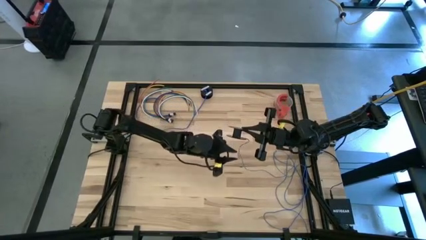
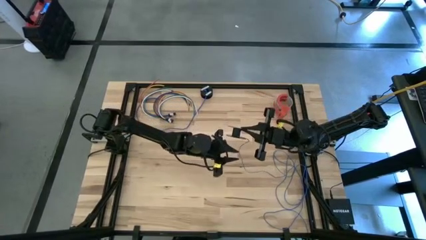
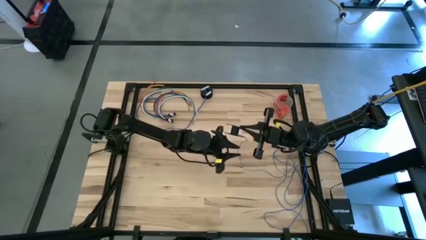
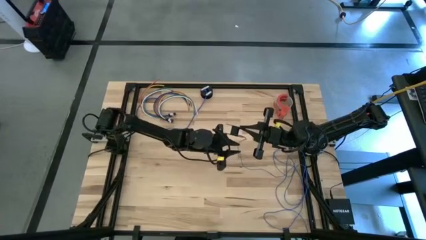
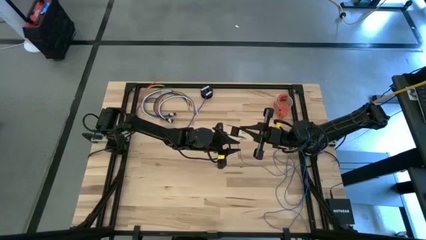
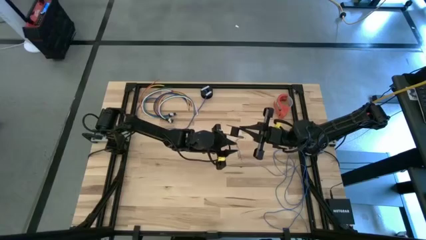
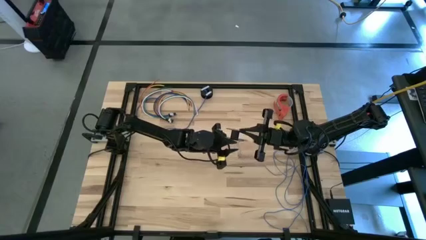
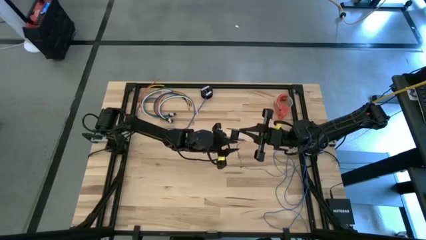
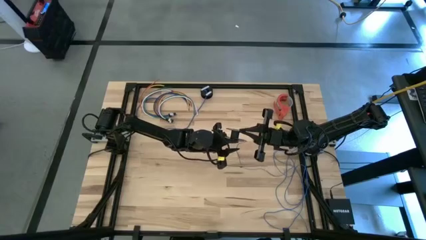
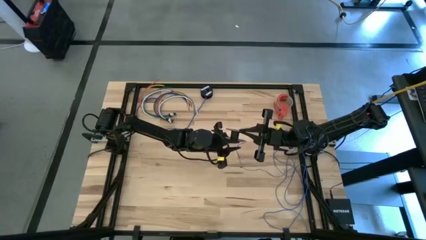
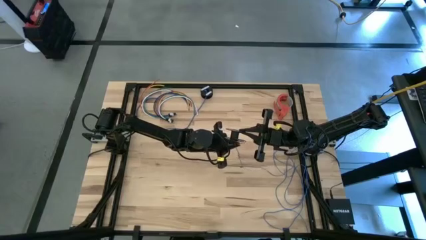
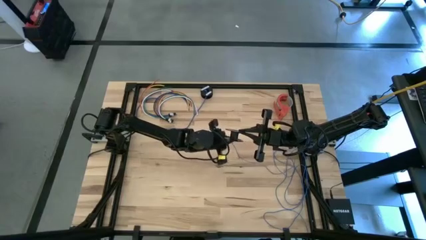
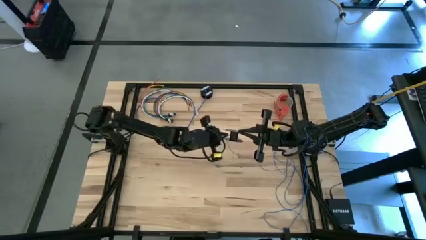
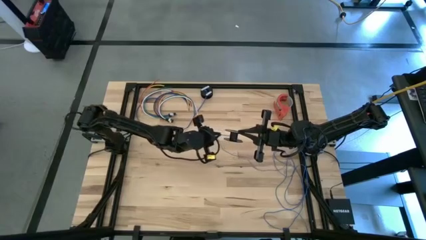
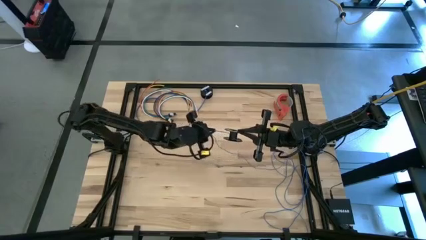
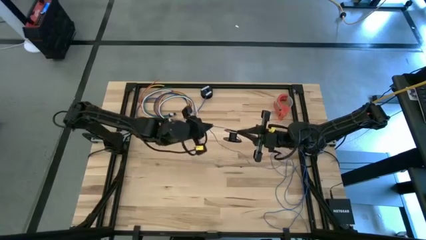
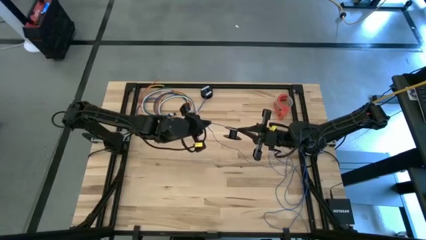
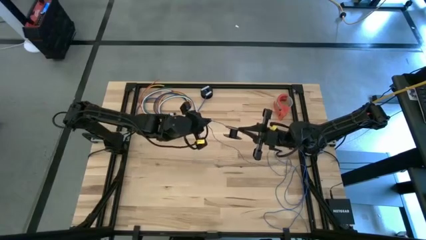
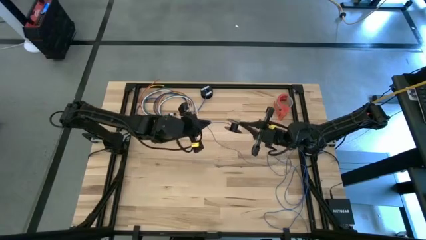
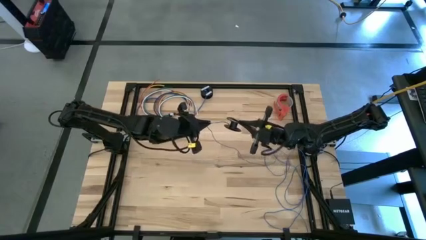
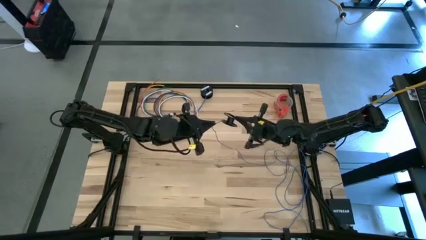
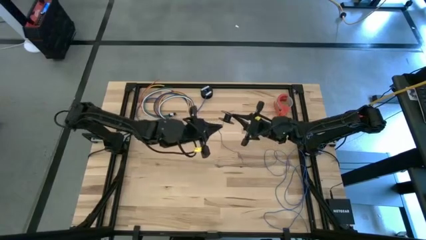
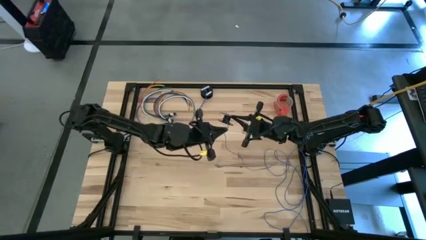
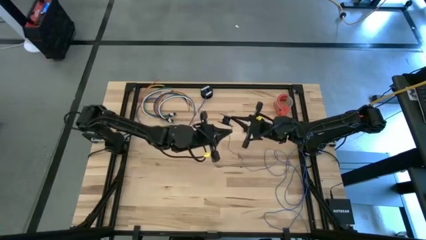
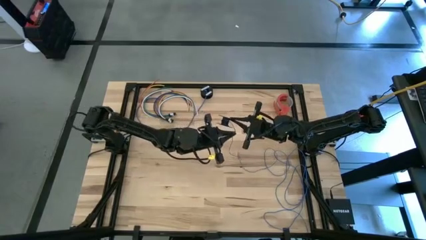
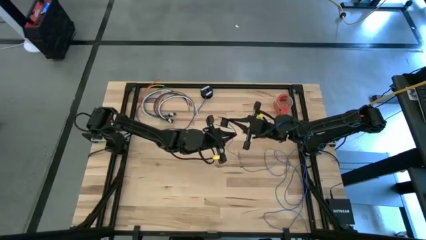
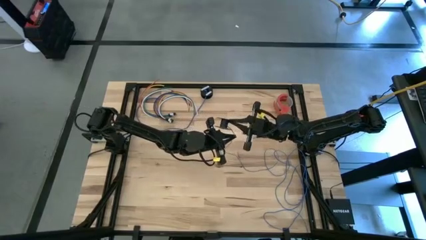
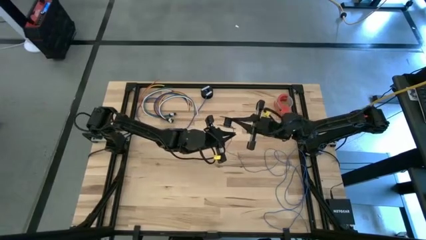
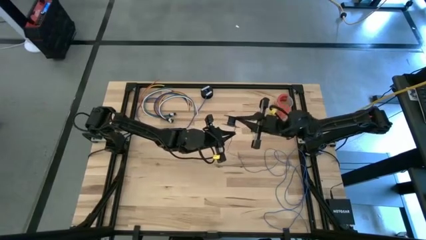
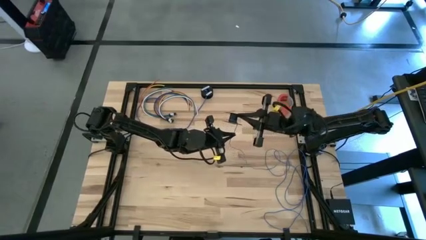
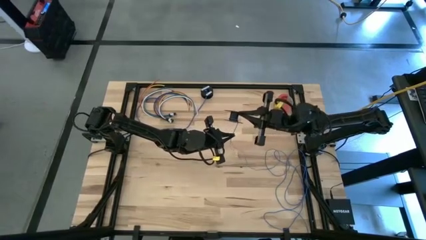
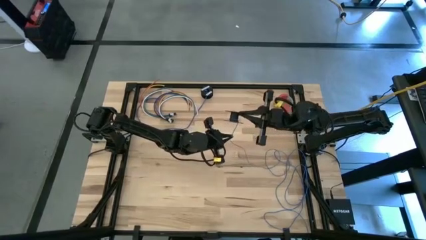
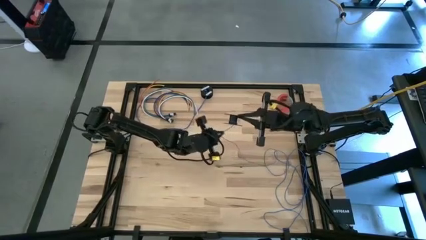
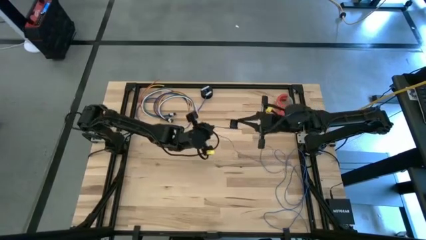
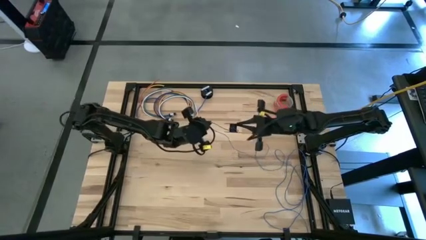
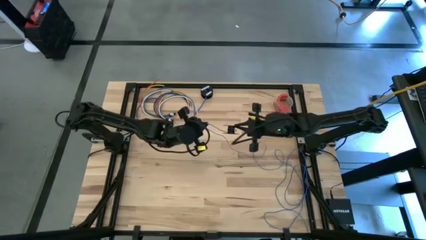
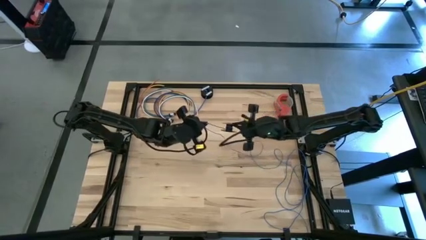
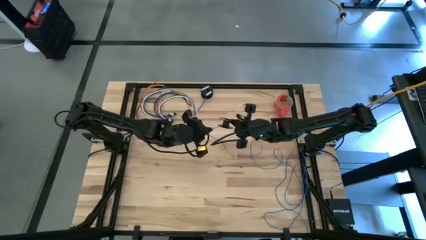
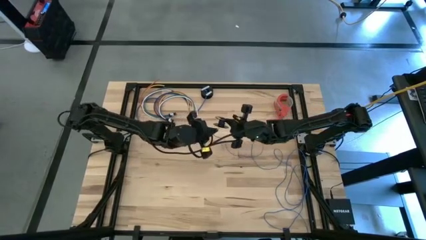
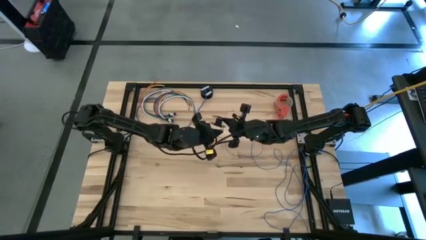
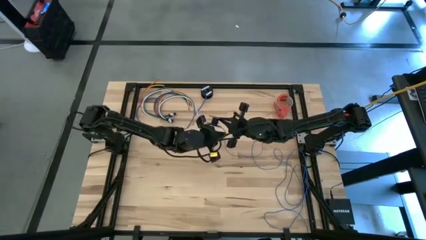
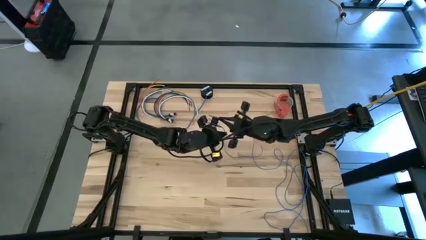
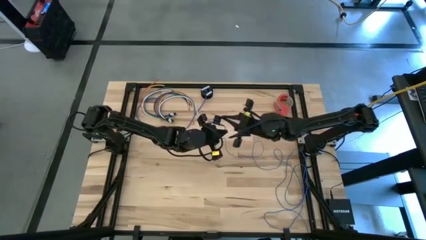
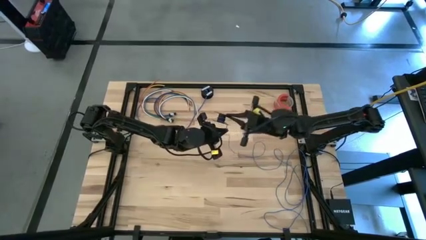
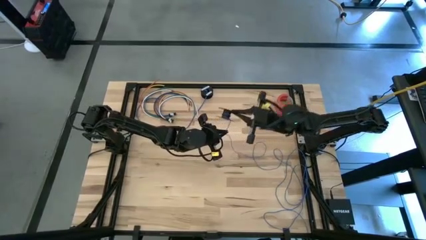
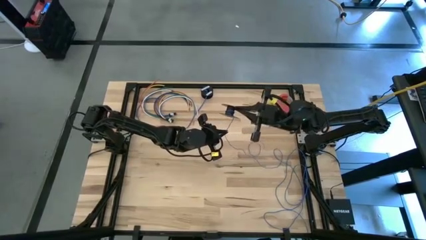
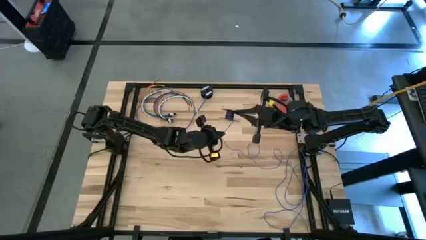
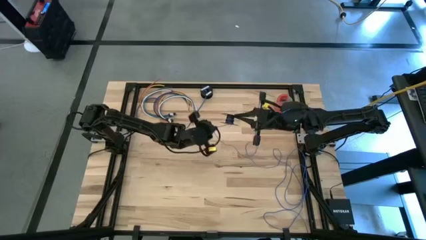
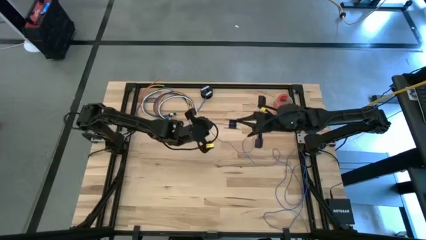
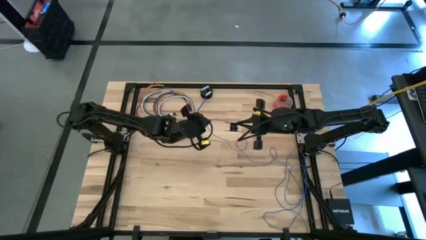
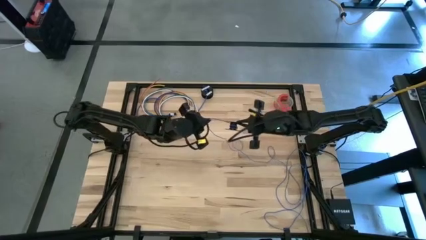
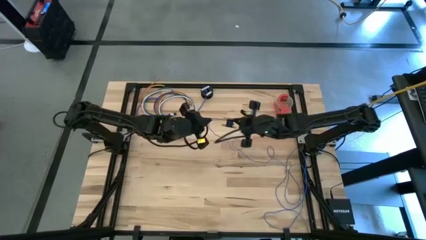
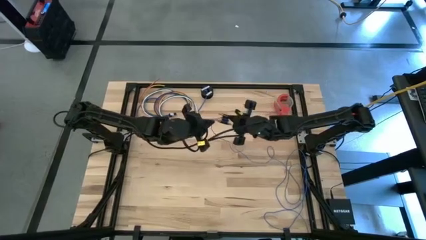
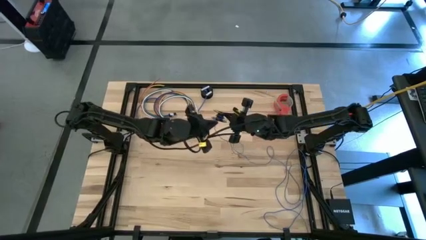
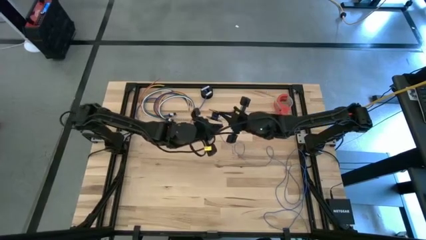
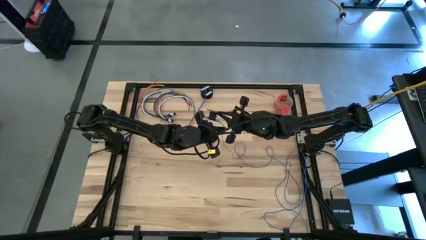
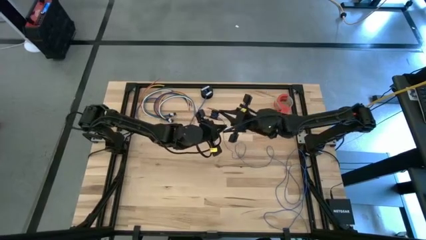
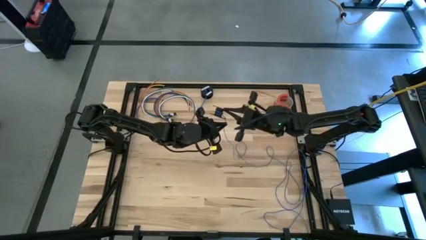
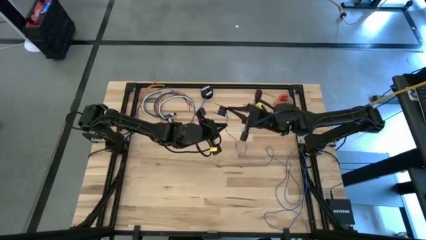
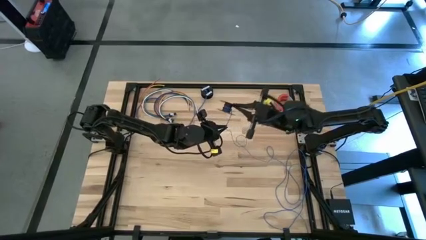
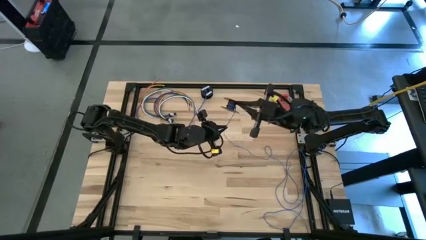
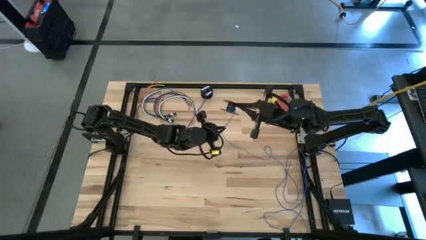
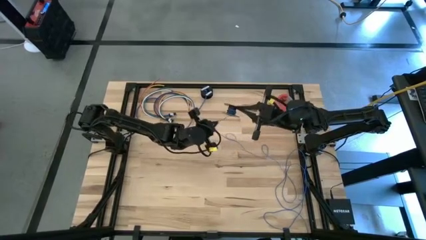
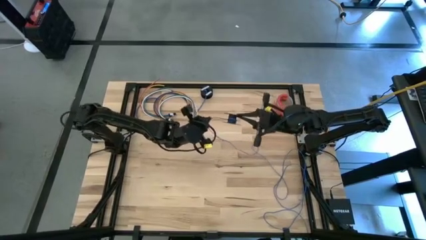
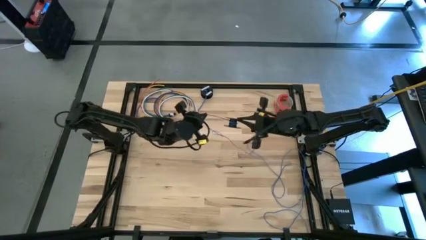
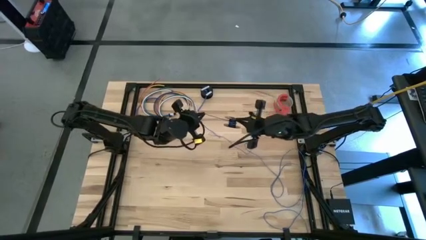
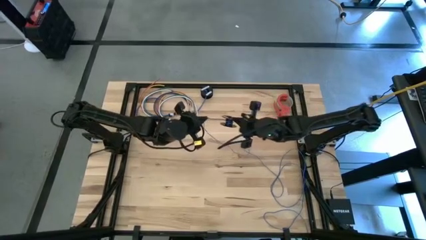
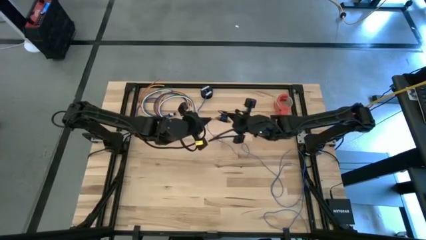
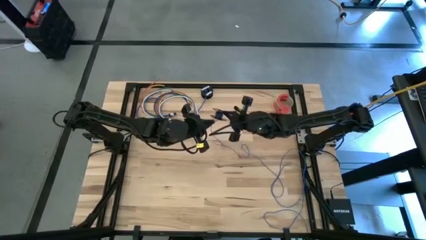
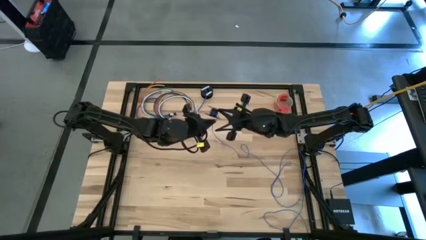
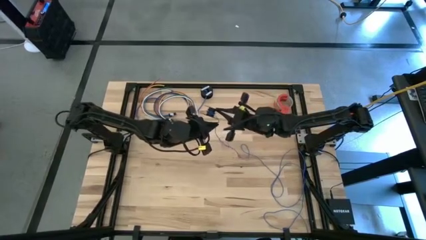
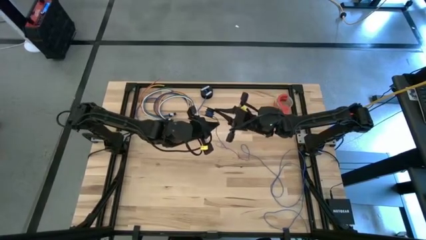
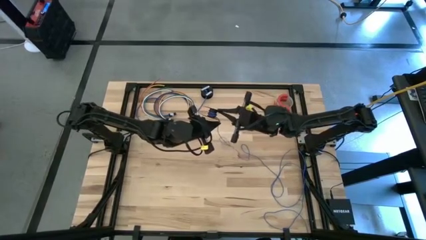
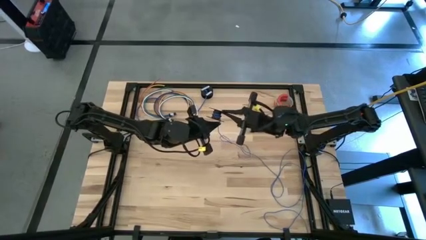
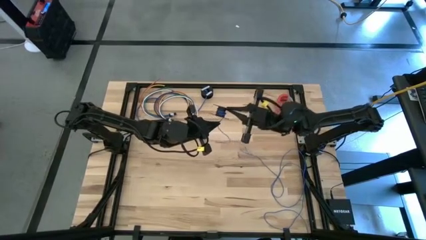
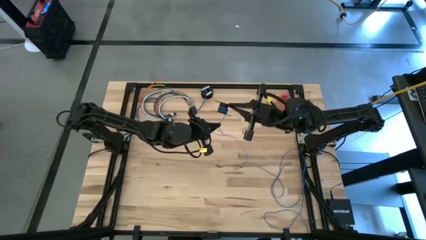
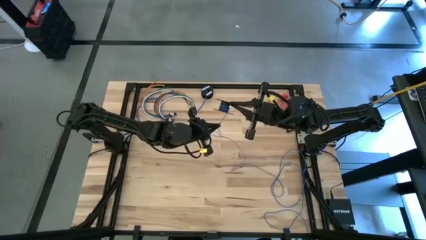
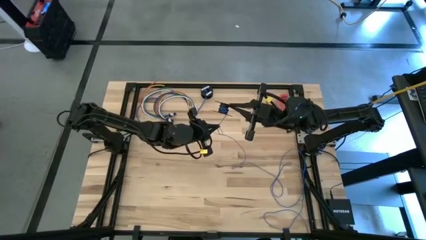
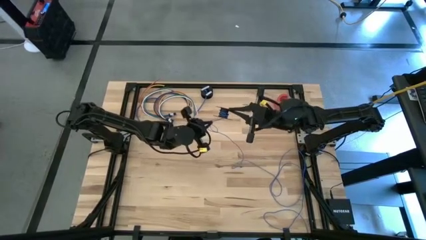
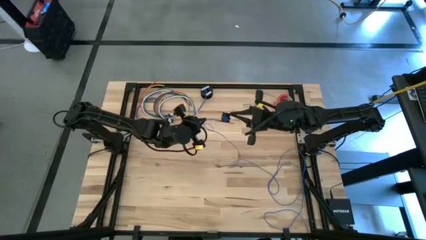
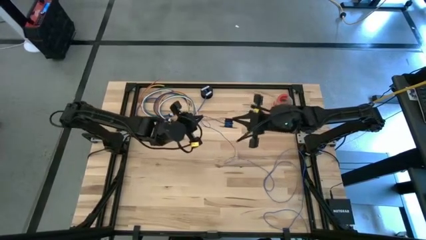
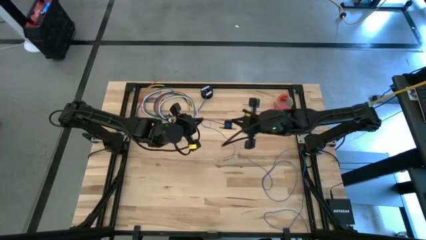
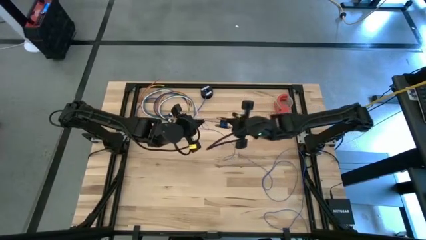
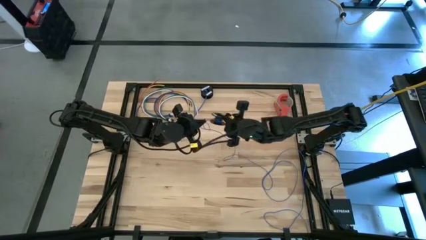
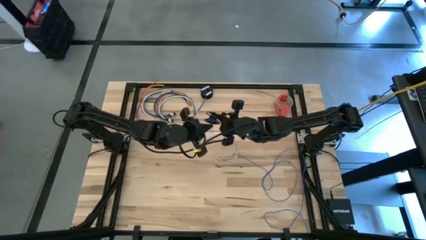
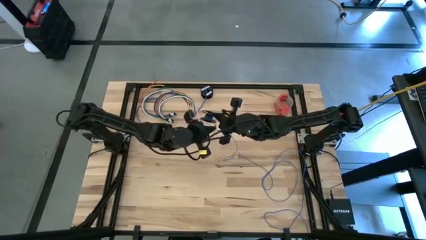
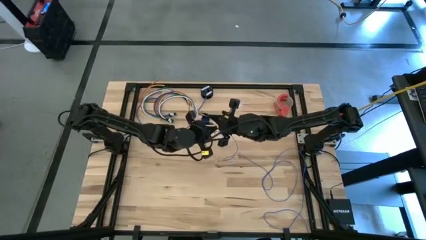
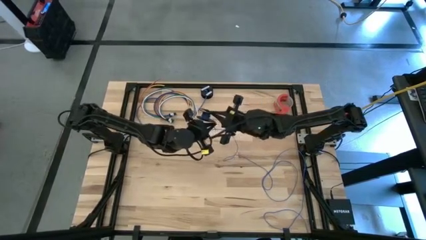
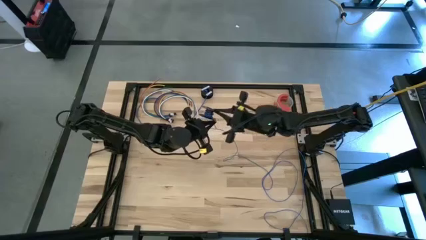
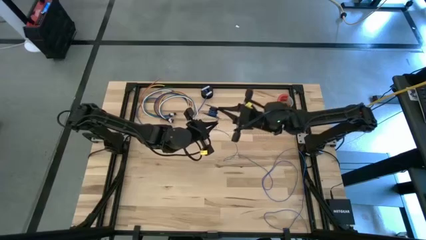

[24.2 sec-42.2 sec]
Task: Coil cords
Coil the blue wire onto the black spool
